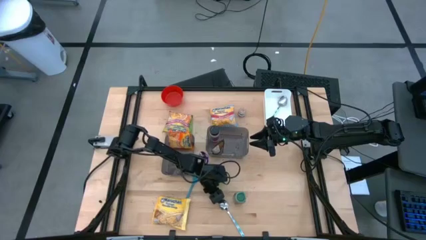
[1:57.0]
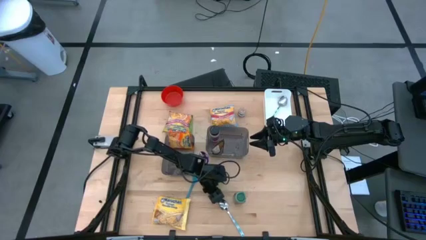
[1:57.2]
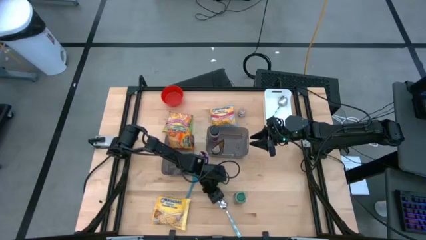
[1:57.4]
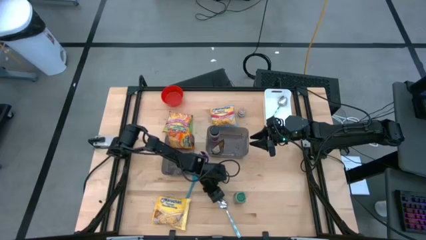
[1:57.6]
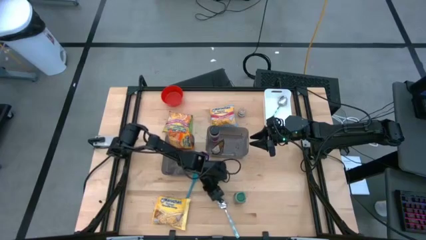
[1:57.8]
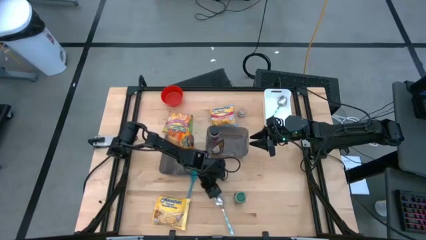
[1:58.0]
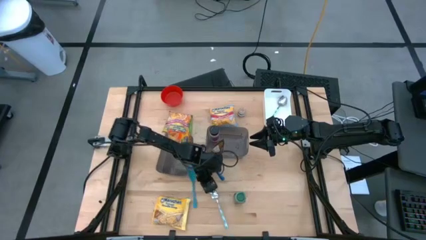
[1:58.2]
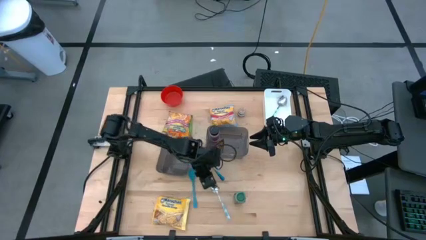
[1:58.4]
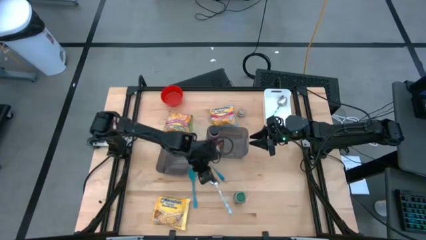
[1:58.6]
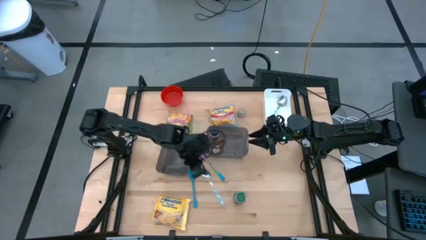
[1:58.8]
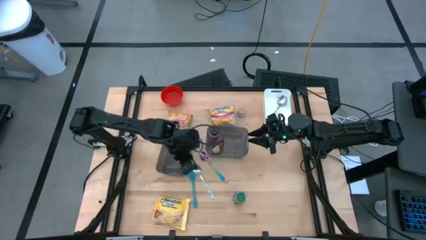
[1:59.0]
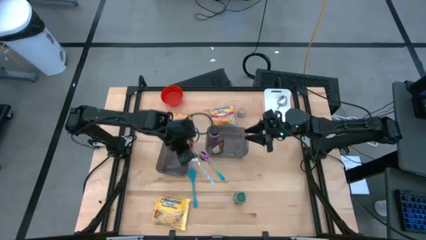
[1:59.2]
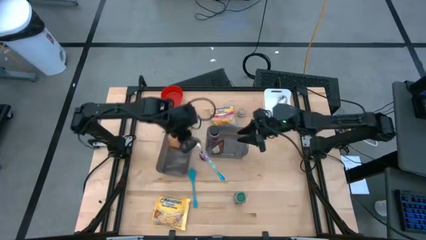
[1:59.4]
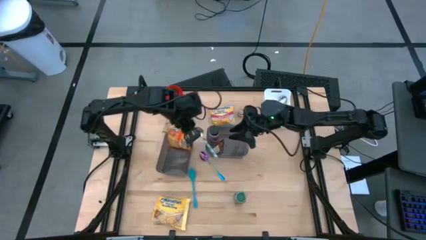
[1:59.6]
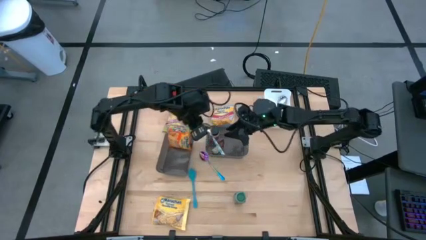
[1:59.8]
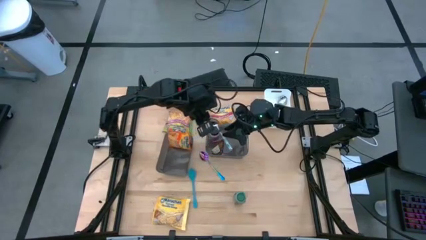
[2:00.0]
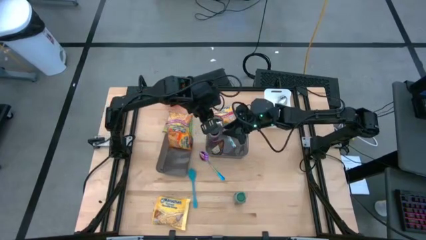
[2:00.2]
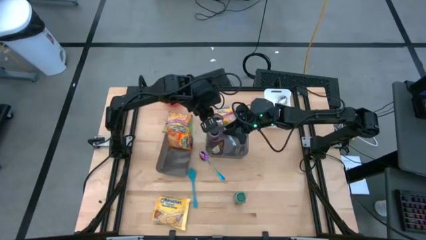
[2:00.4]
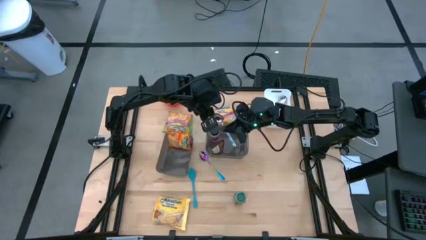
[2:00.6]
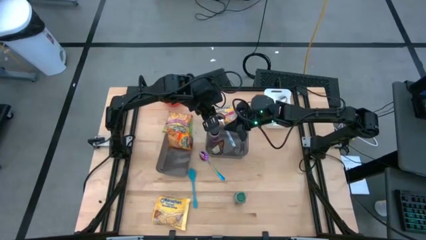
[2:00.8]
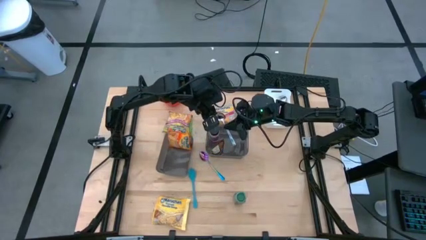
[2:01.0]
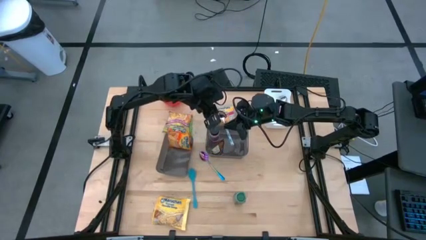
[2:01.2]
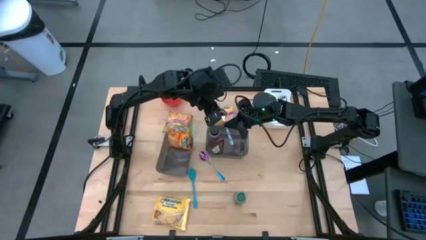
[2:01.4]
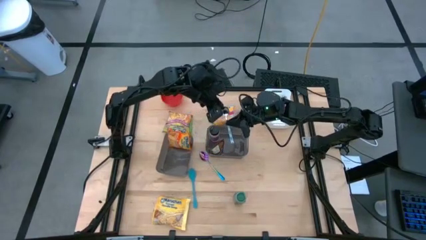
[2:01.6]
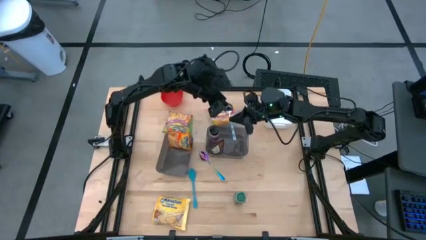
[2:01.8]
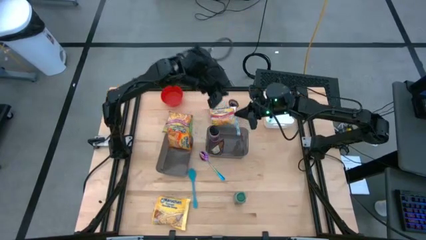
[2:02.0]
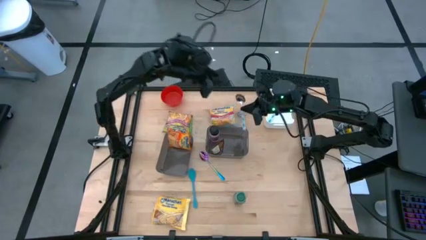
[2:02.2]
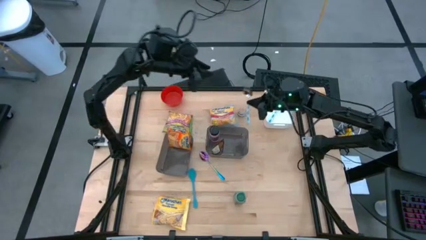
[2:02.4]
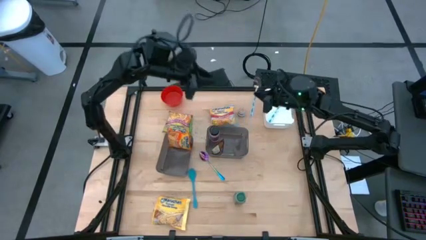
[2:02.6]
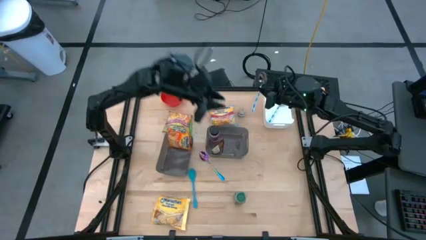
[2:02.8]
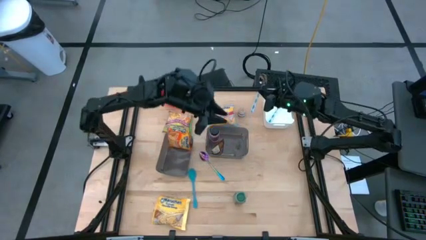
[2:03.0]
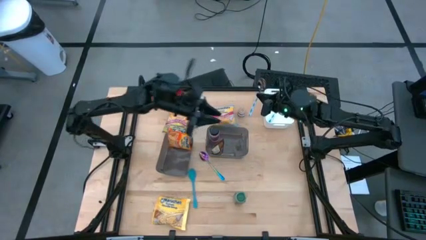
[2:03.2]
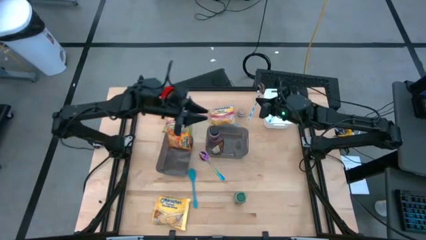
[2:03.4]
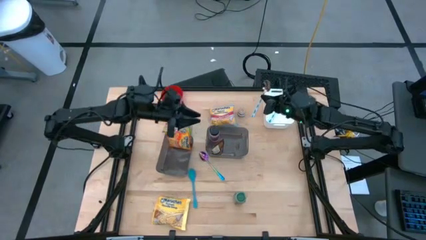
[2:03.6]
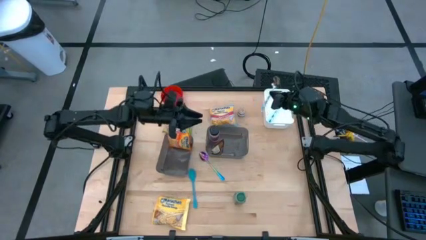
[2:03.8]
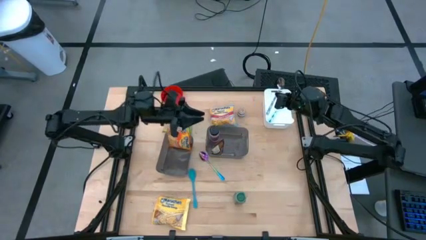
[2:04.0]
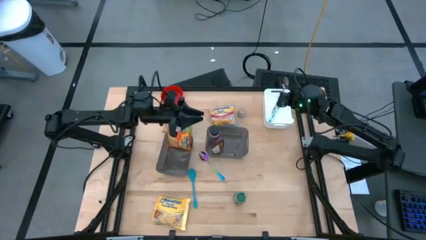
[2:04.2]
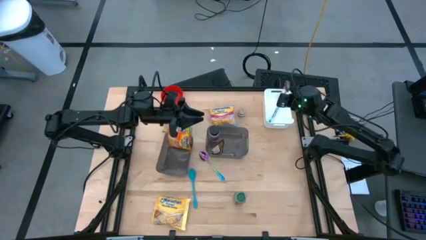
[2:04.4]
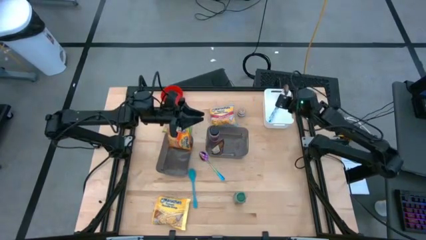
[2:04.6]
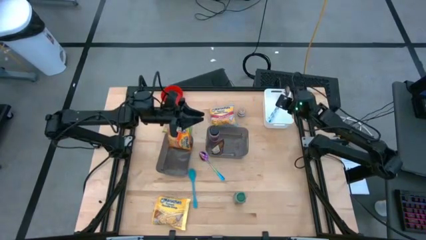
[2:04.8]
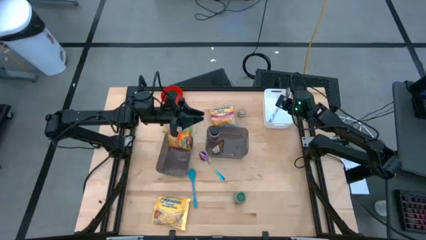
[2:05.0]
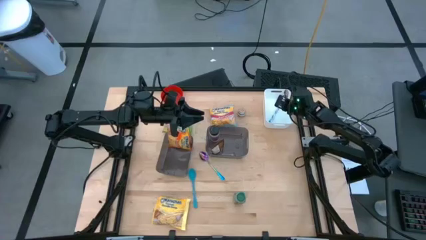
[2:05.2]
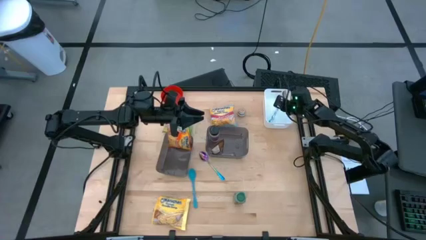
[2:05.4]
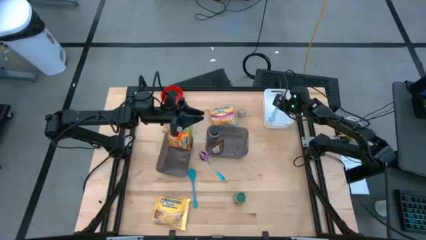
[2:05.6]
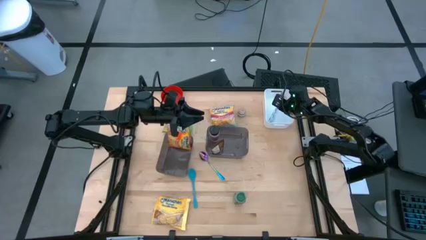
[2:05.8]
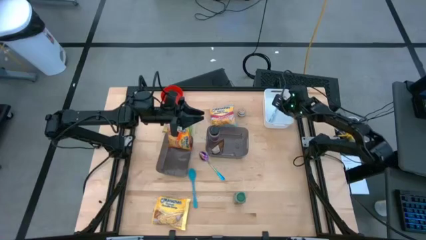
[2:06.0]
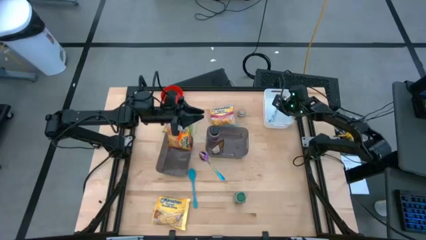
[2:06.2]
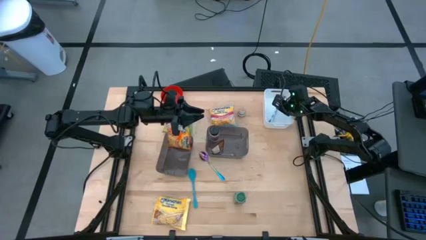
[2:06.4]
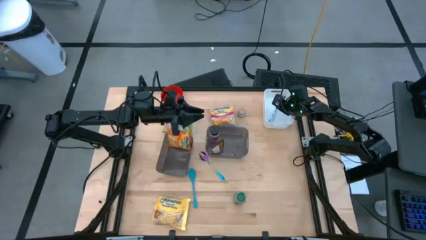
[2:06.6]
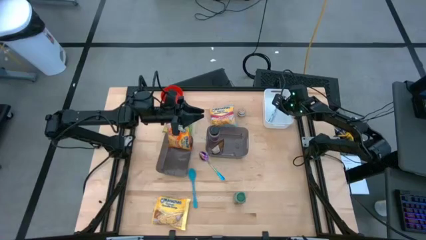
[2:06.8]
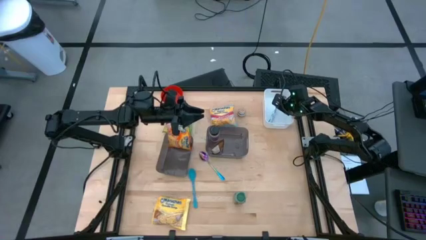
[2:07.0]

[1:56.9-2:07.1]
Task: Pick & Place Food Item
Put the blue patterned spoon into the white bin

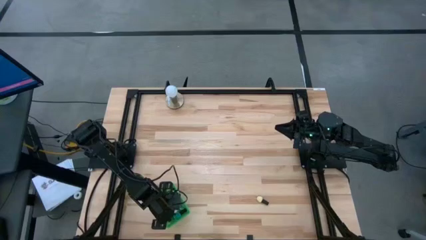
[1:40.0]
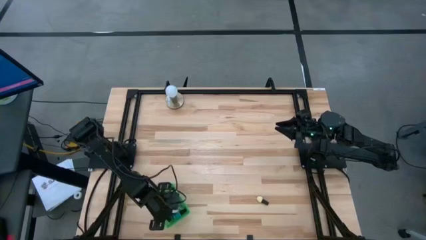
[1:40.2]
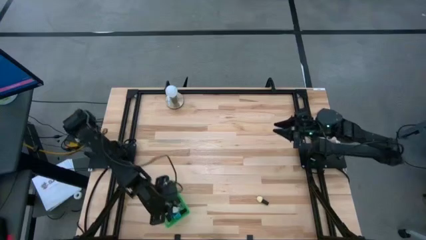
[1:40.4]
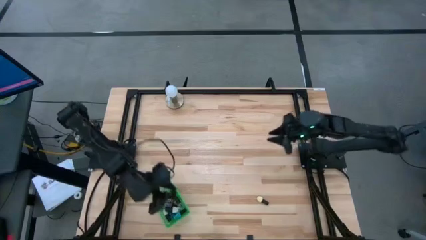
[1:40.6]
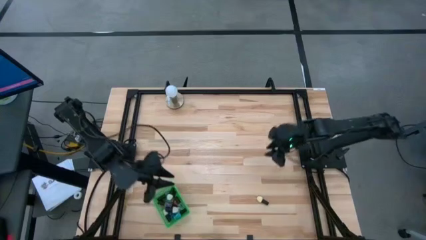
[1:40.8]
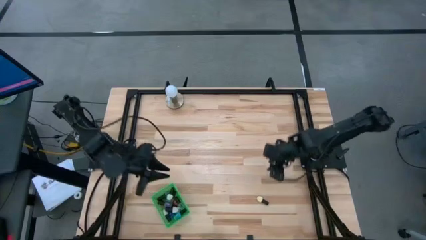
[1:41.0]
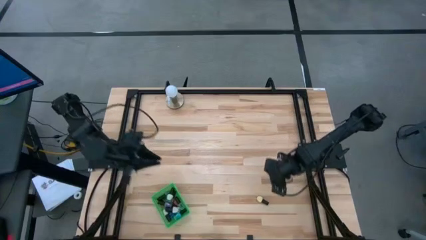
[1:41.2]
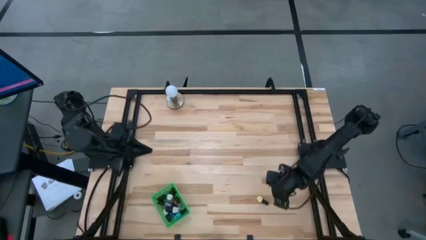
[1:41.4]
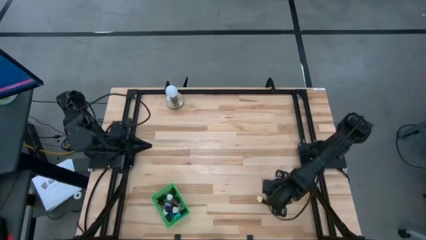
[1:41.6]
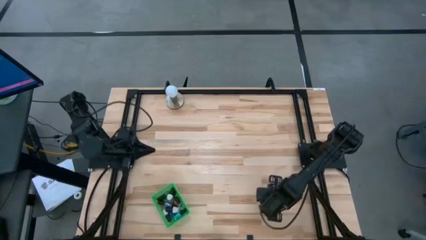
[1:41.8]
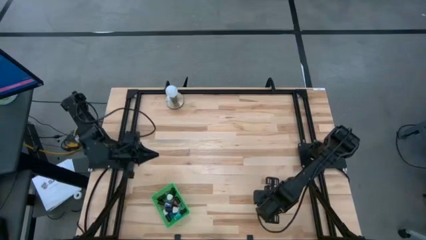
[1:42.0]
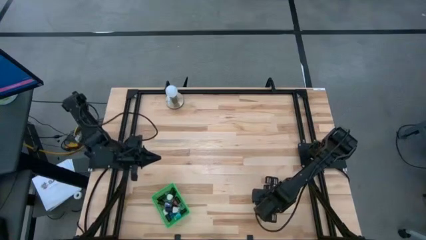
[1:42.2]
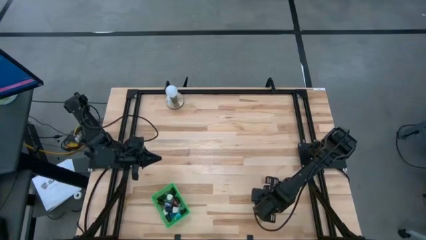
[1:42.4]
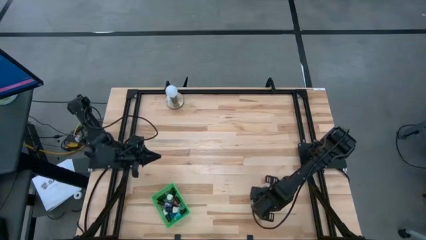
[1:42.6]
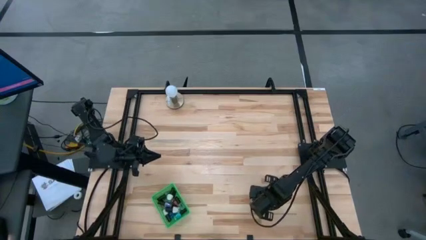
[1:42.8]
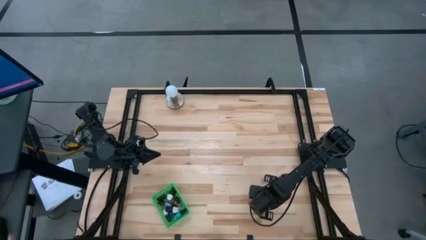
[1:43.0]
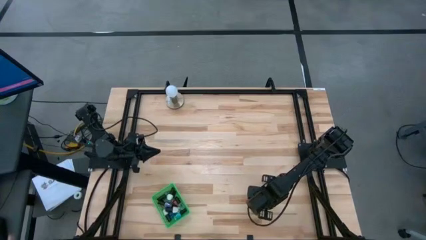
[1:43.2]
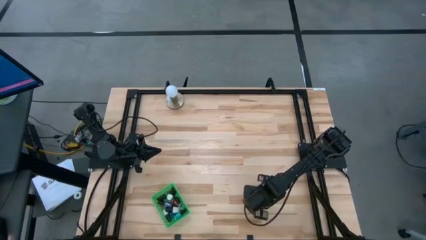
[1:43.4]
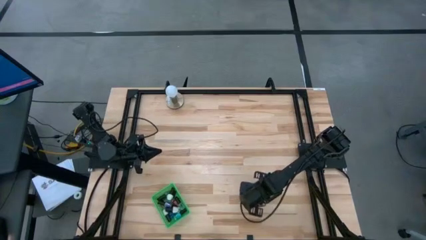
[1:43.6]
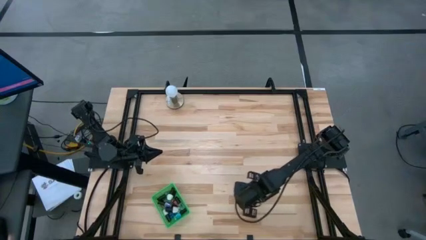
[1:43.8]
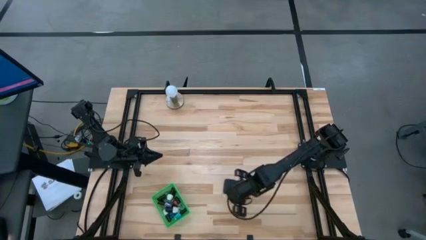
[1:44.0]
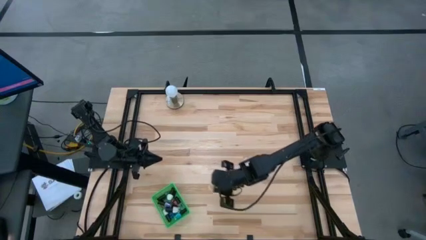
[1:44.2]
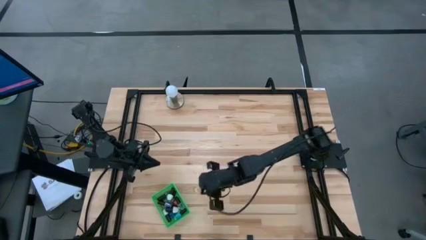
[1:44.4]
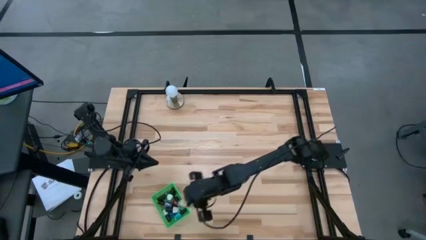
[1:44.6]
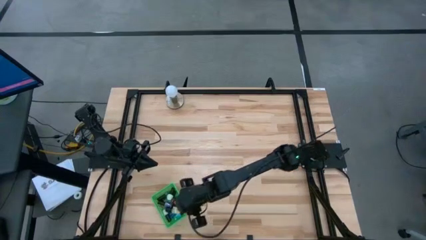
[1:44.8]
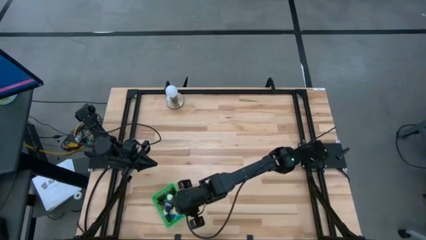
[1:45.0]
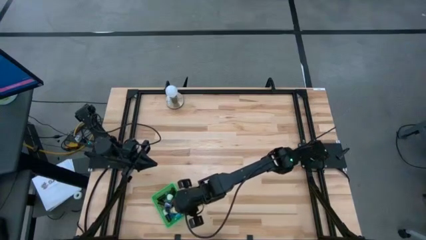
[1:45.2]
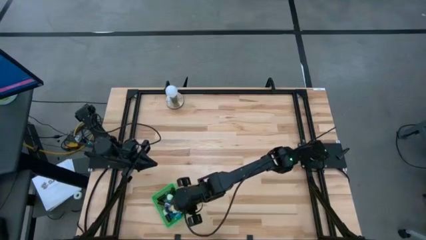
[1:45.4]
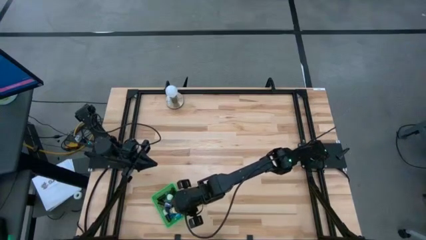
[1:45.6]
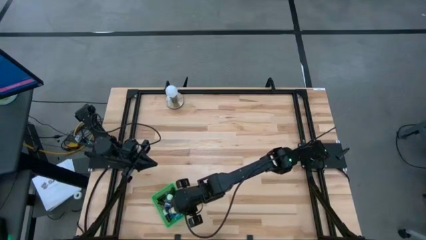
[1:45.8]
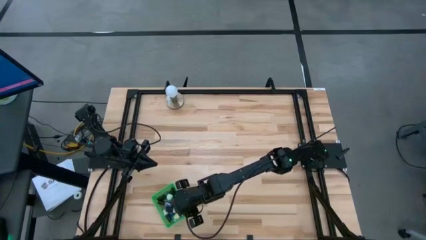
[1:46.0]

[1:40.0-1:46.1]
Task: Pick & Place Nail Polish
Put the black yellow nail polish bottle into the green basket
